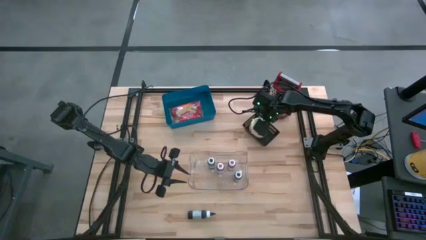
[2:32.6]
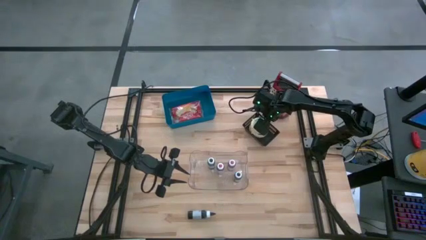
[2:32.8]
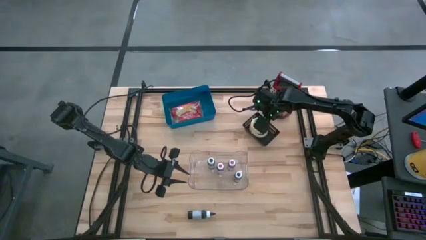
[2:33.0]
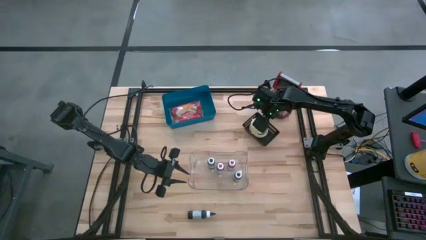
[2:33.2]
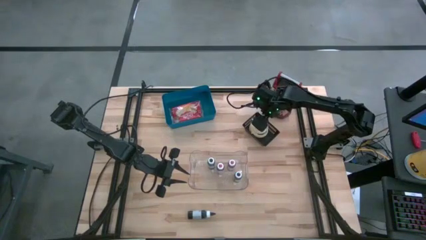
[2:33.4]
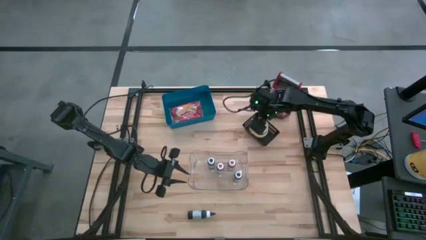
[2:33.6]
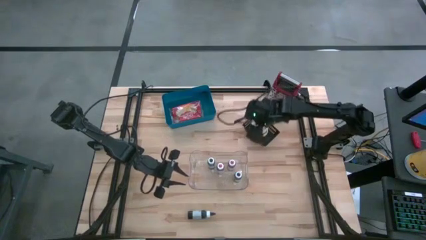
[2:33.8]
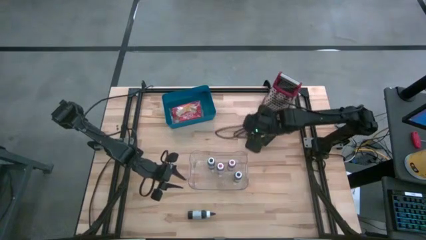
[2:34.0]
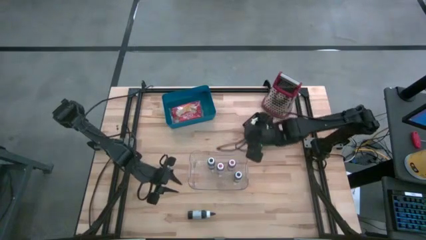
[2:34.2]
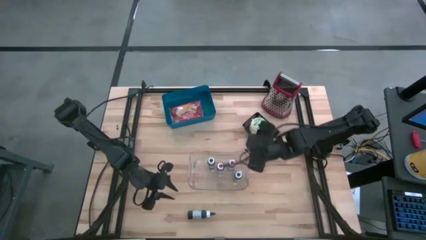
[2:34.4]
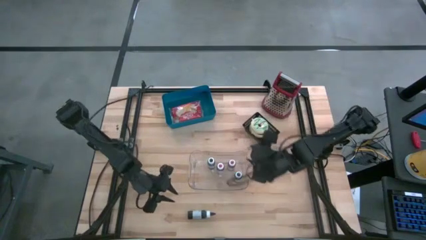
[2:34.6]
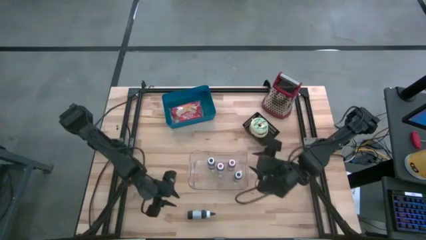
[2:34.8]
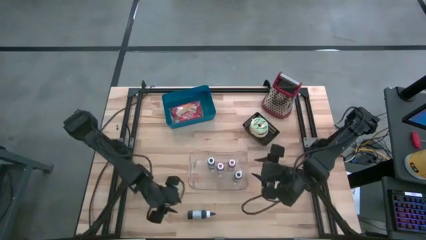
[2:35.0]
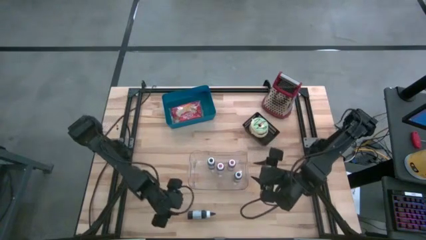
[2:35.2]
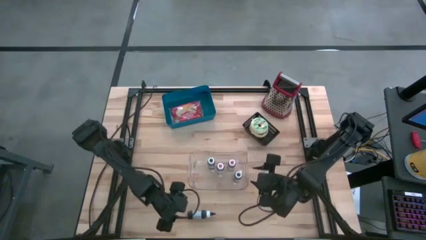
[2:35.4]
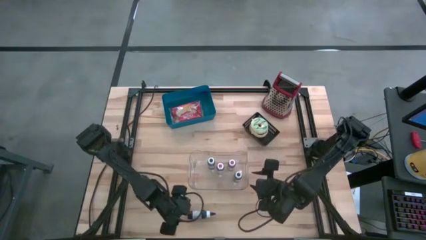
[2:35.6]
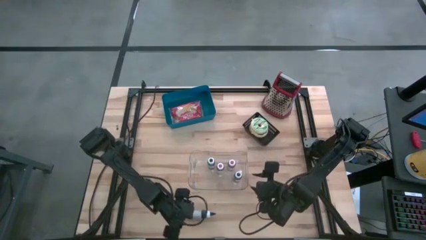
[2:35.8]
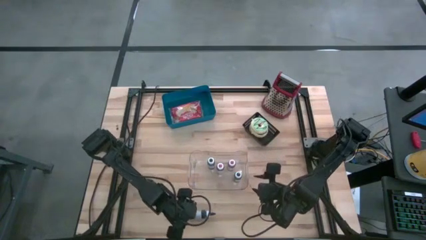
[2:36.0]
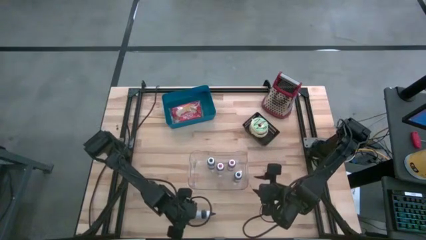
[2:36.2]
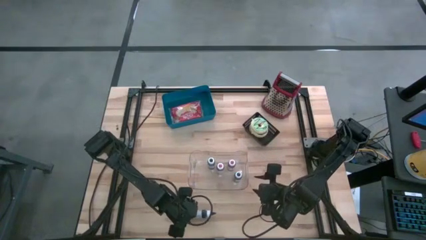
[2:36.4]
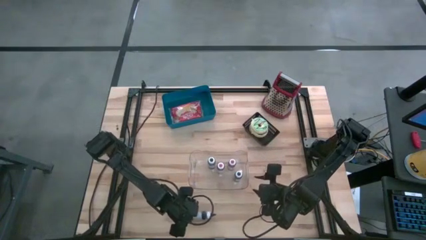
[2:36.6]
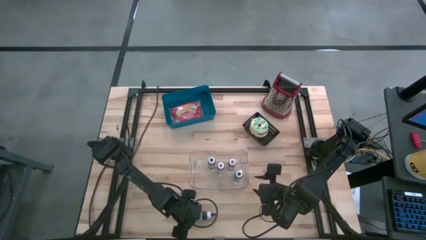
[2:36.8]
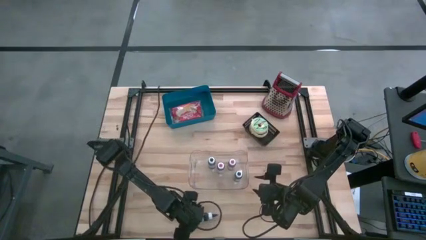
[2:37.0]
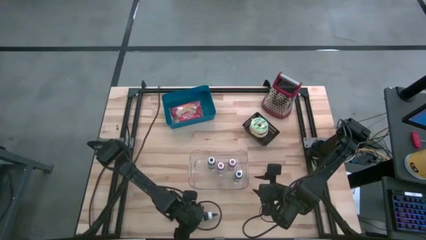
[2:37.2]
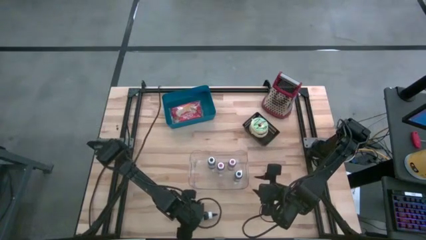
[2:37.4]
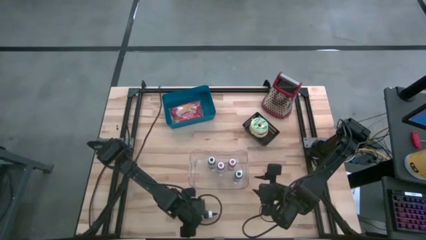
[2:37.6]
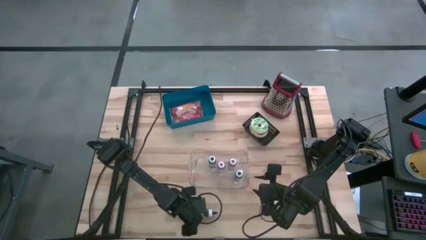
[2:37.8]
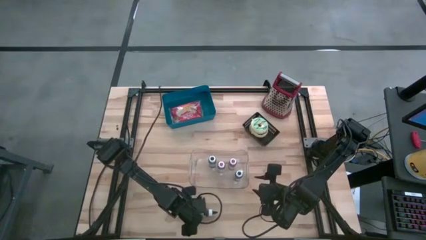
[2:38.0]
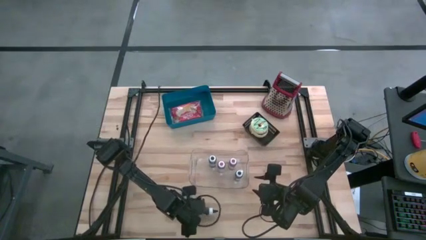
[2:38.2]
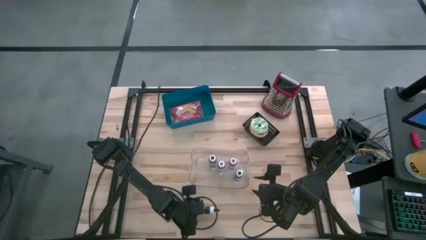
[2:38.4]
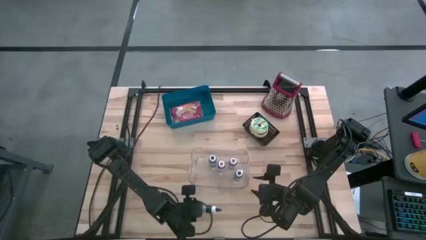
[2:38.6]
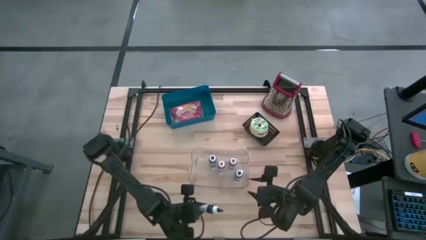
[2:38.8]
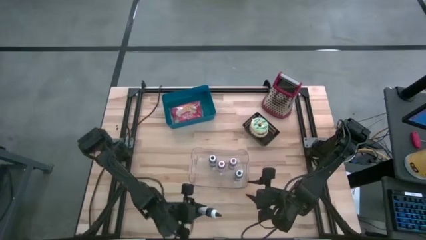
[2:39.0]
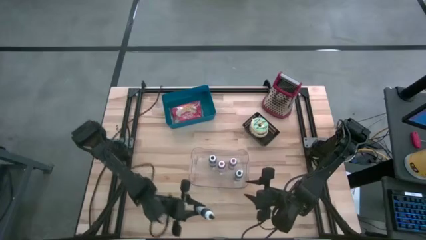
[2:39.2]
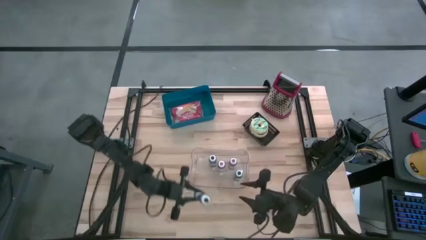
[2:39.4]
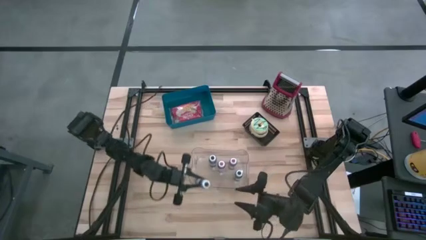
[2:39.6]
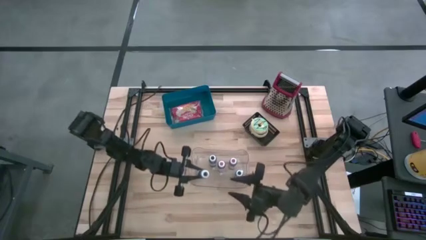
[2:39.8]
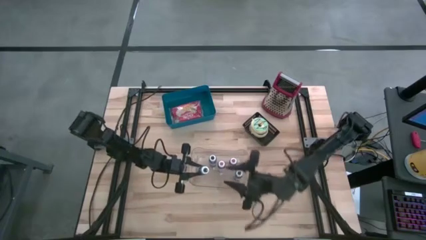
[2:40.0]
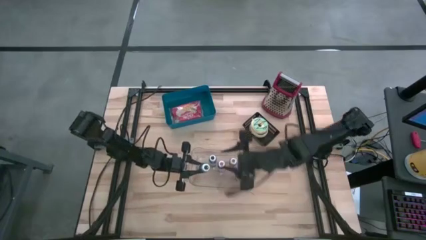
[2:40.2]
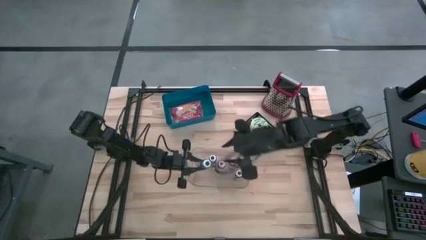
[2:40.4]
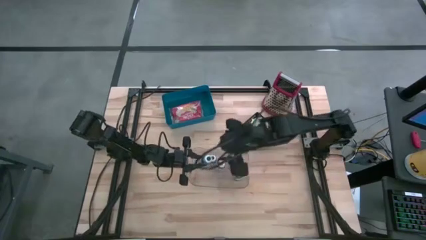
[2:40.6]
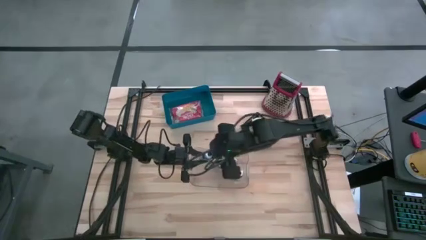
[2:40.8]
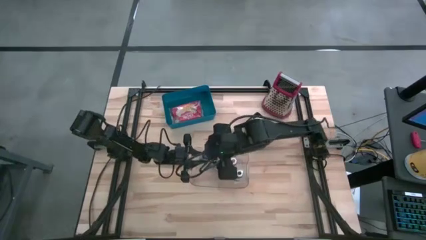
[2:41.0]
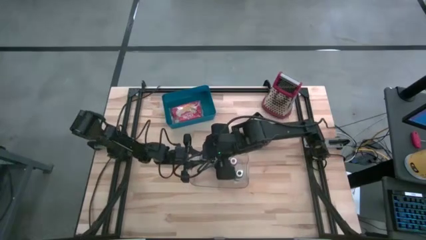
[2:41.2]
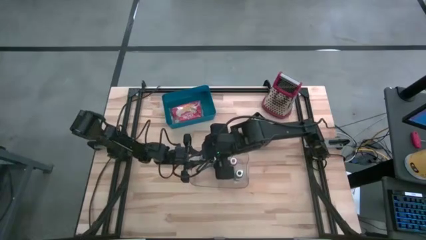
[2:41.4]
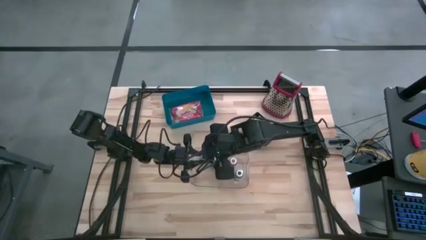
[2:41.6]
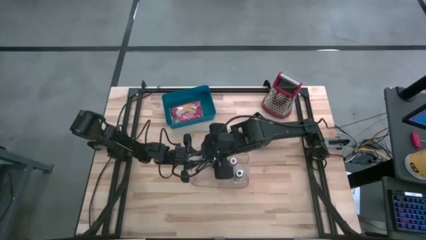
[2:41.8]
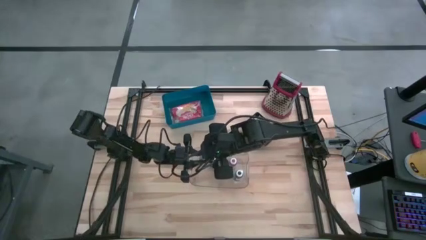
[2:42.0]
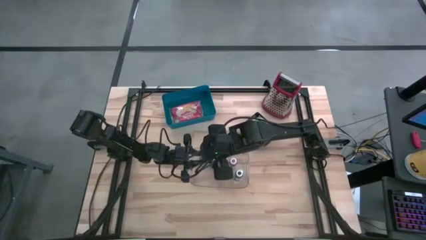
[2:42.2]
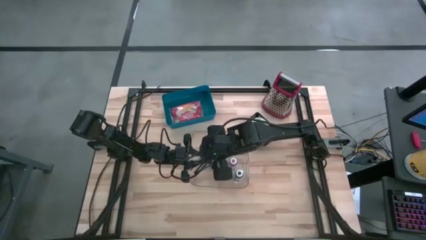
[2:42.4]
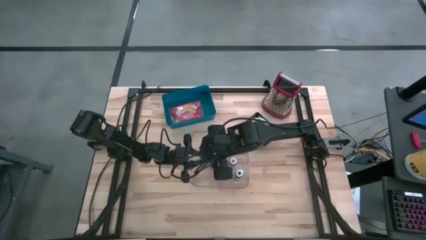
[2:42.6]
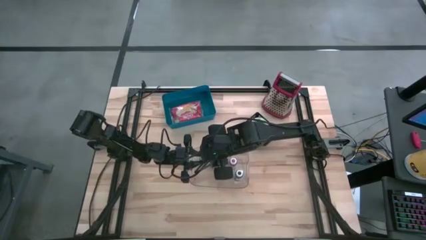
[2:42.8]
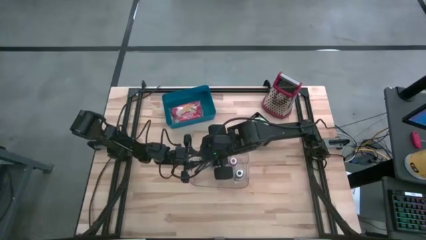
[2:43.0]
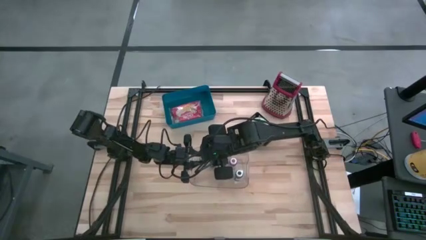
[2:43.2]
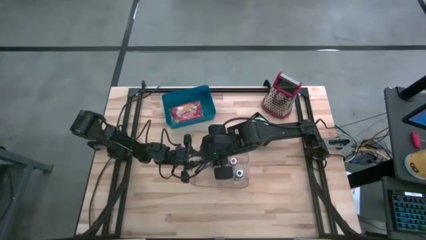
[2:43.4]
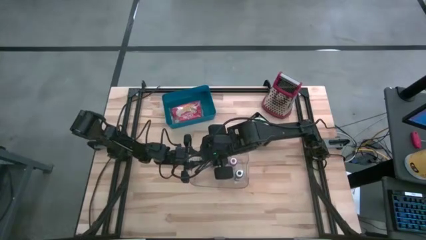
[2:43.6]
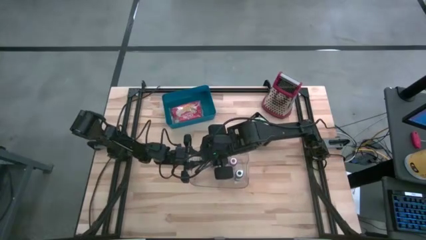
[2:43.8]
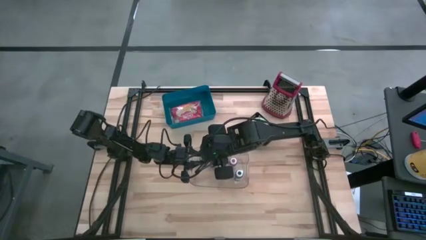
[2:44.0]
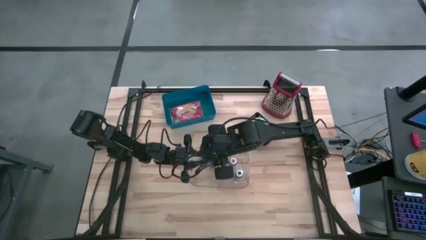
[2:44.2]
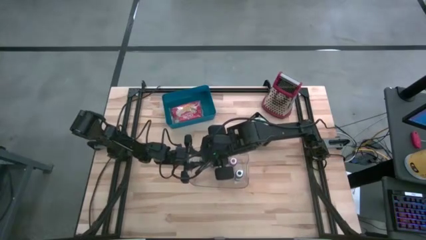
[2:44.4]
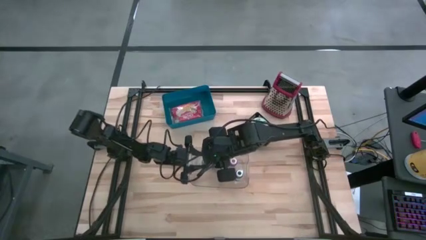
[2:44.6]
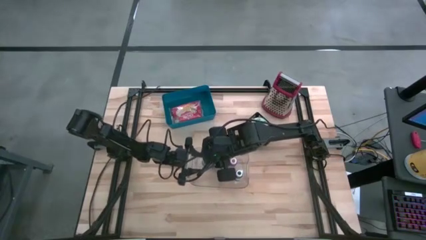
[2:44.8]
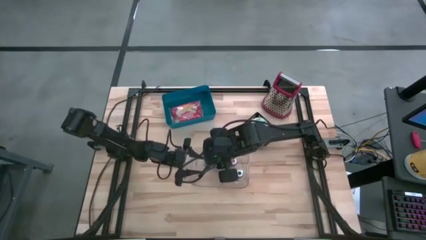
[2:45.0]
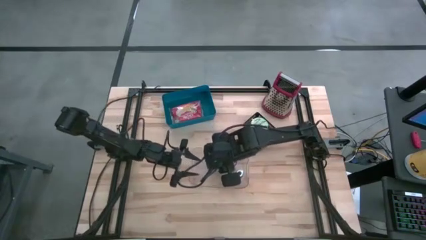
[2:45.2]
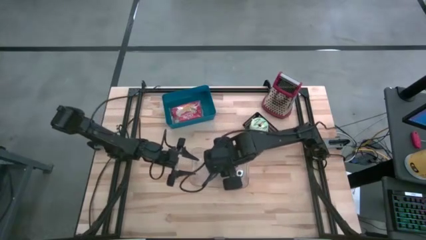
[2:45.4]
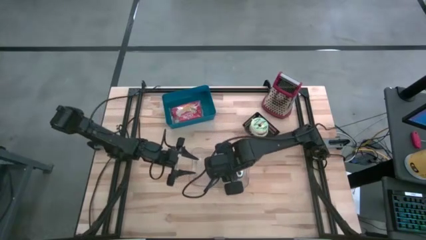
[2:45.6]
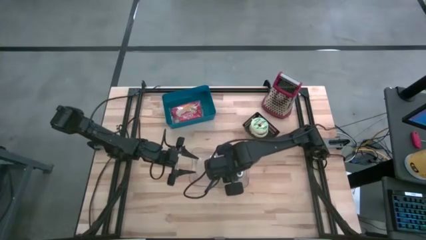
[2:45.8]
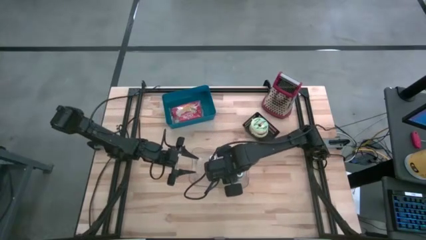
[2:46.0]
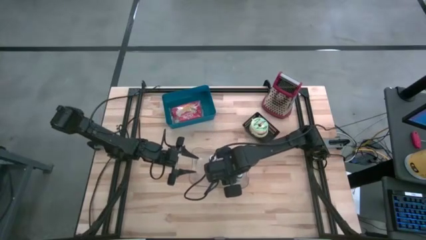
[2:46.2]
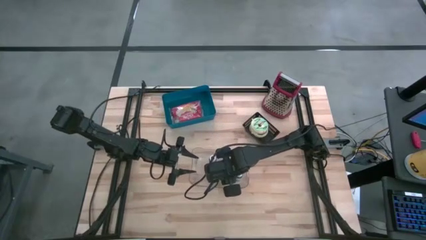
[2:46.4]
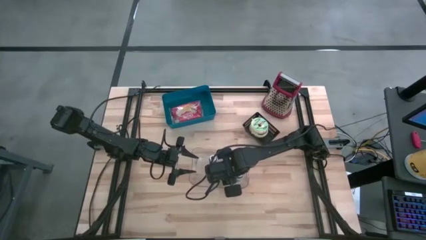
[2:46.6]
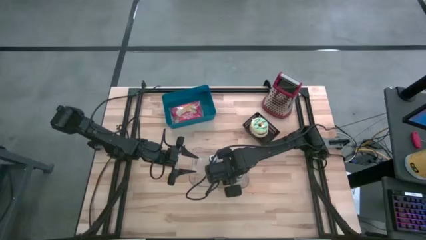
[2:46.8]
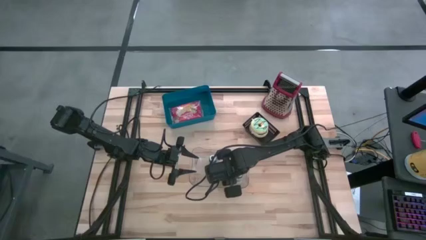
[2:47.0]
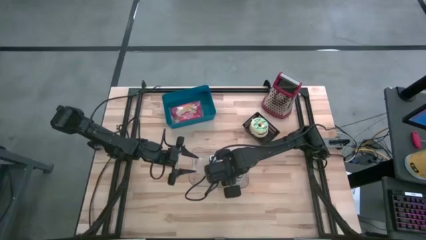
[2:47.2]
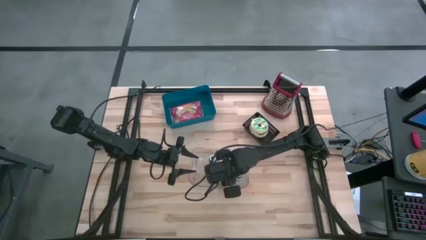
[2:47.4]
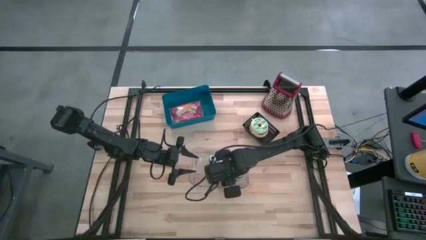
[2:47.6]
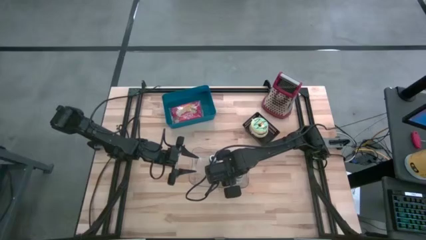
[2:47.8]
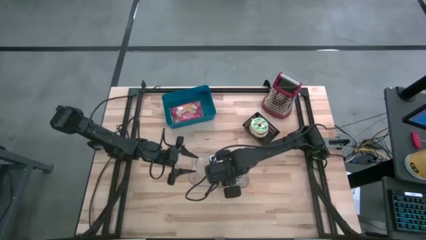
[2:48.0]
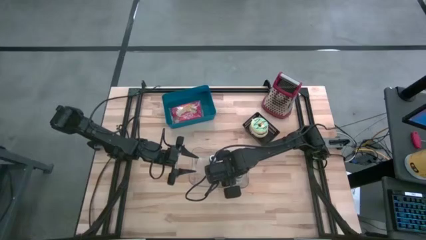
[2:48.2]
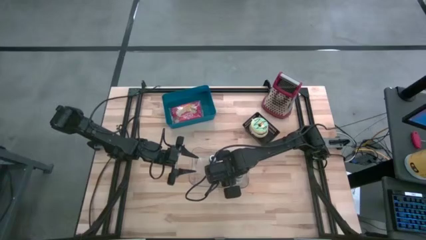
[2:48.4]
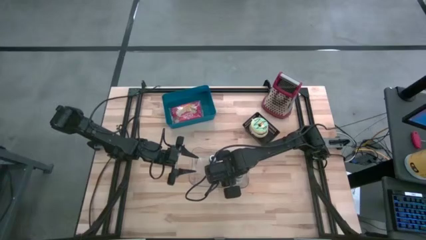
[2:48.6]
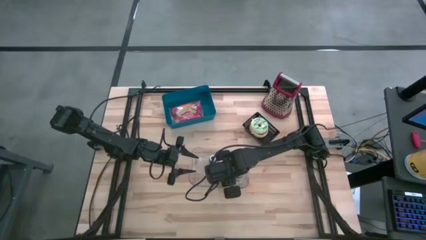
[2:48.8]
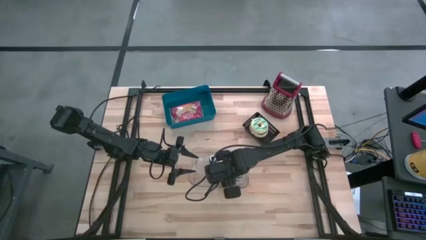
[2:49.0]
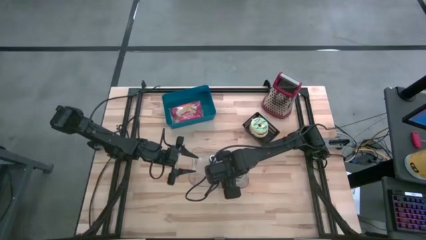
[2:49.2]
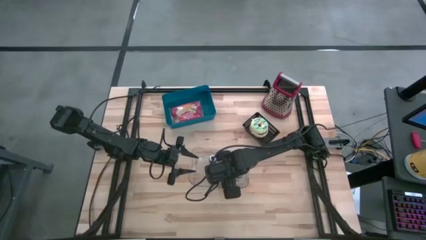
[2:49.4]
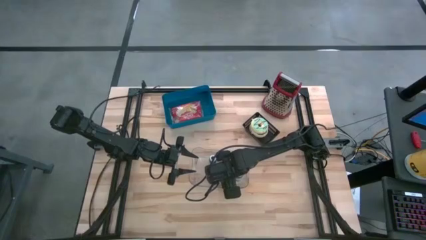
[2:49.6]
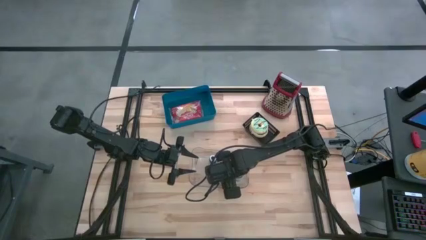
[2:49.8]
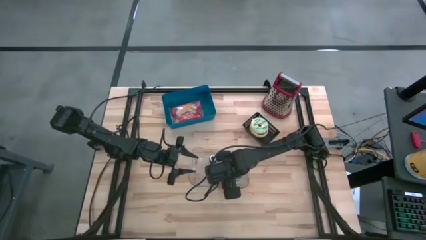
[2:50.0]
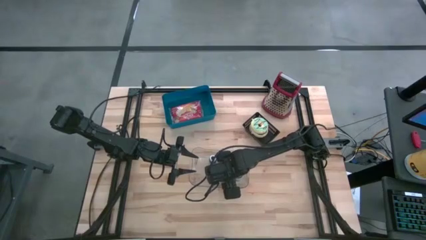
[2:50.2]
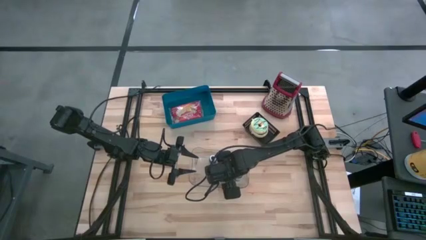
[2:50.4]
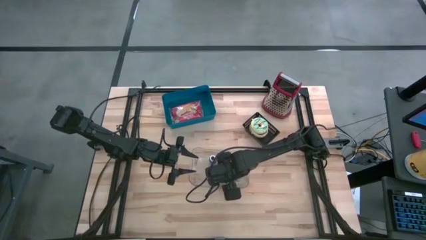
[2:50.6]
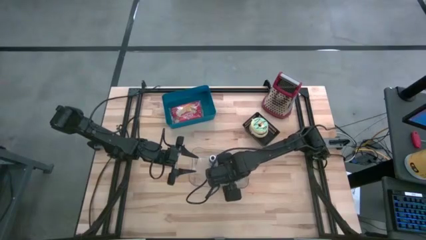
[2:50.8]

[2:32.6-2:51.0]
Put the black food coloring bottle into the transparent bin
